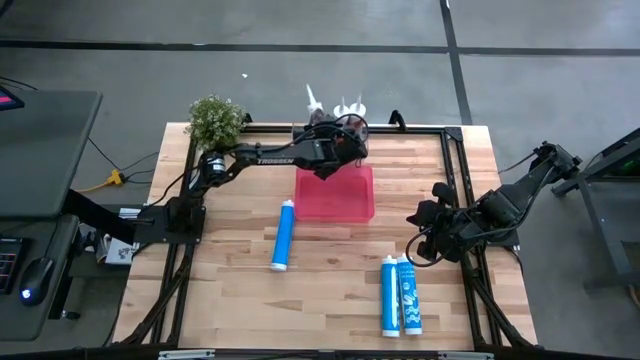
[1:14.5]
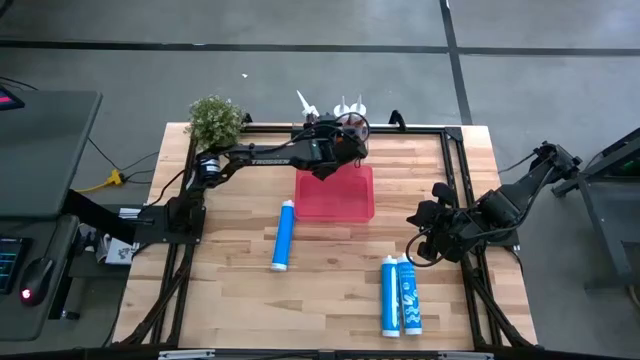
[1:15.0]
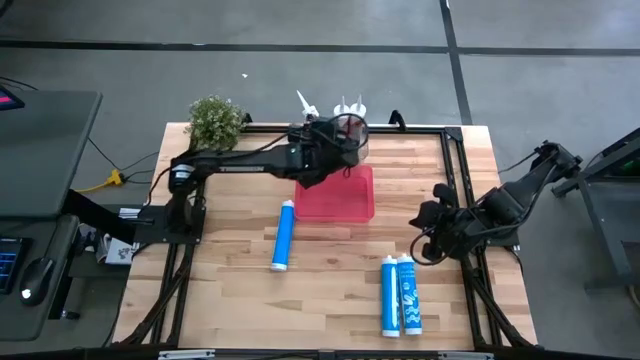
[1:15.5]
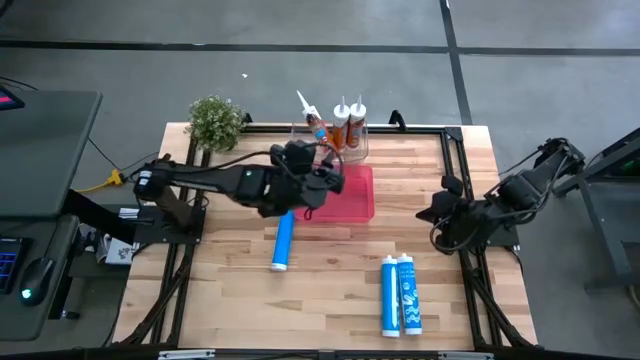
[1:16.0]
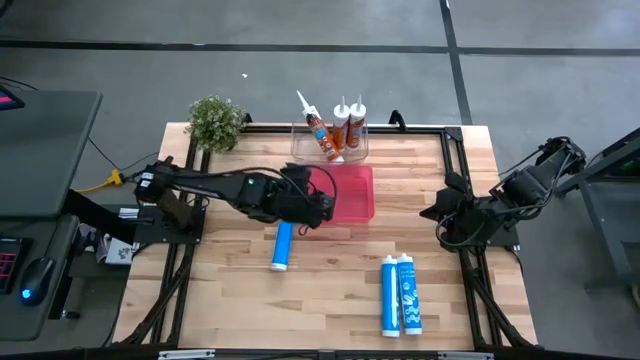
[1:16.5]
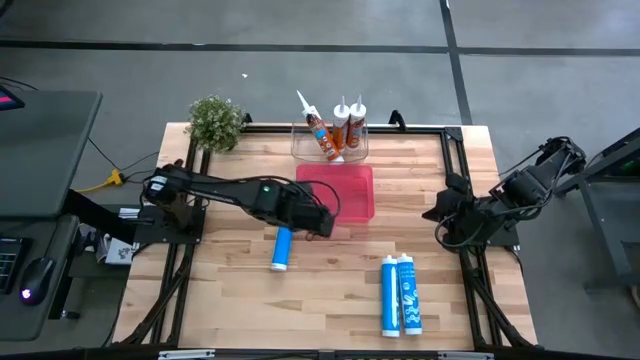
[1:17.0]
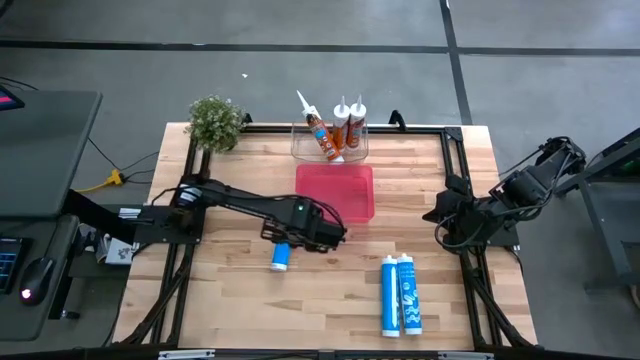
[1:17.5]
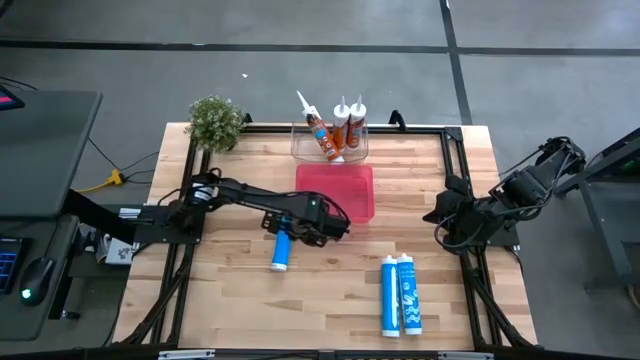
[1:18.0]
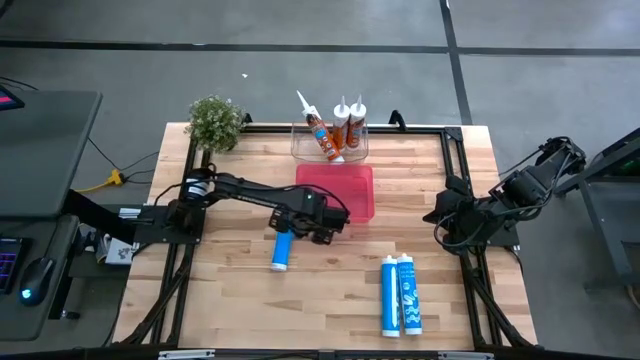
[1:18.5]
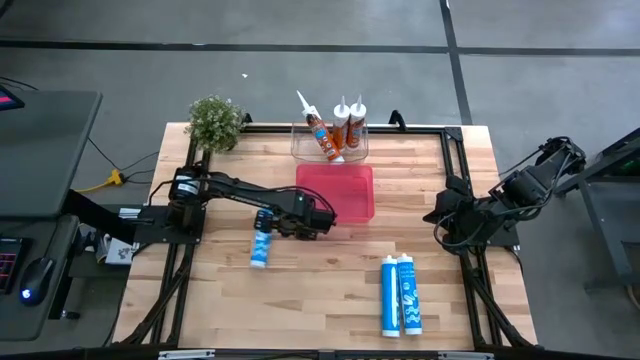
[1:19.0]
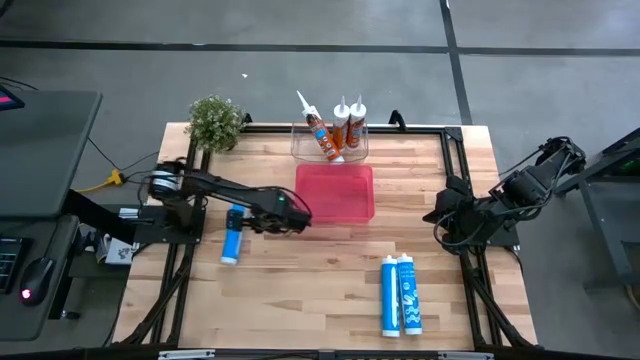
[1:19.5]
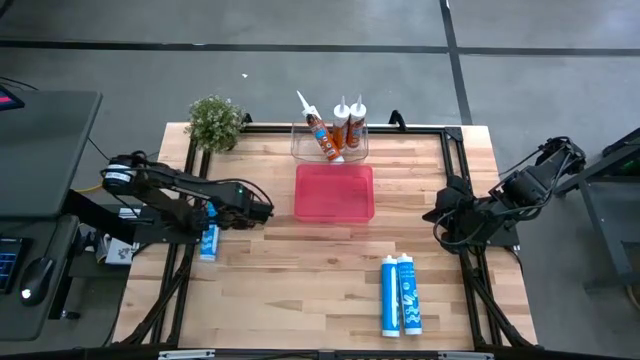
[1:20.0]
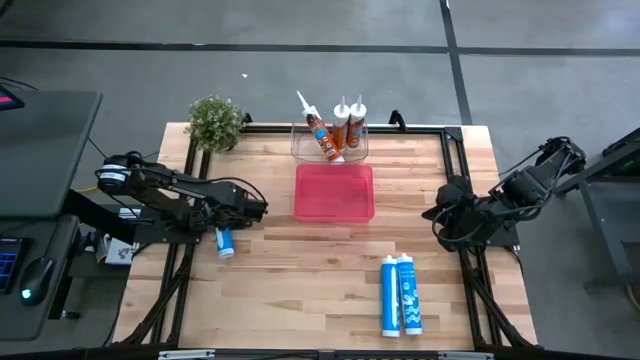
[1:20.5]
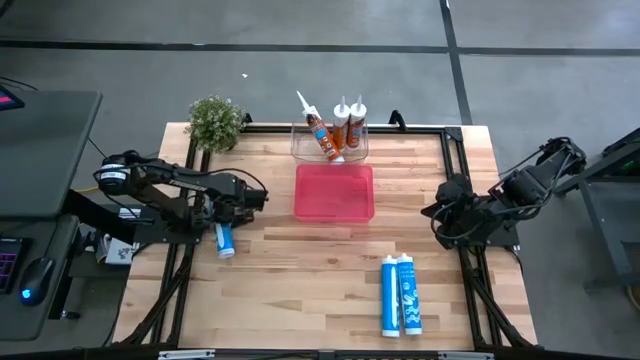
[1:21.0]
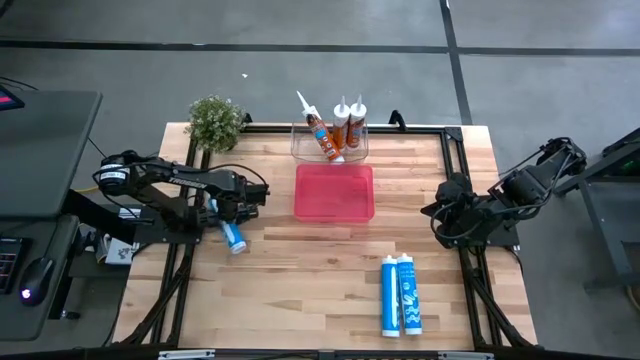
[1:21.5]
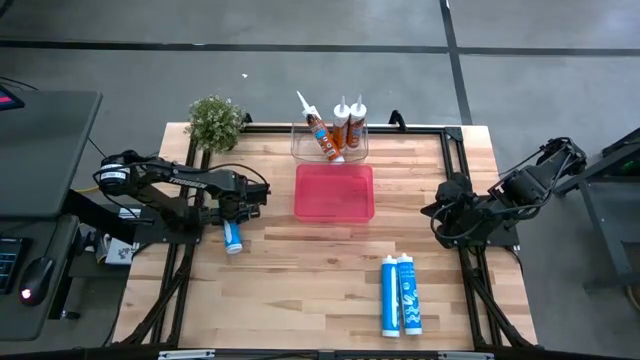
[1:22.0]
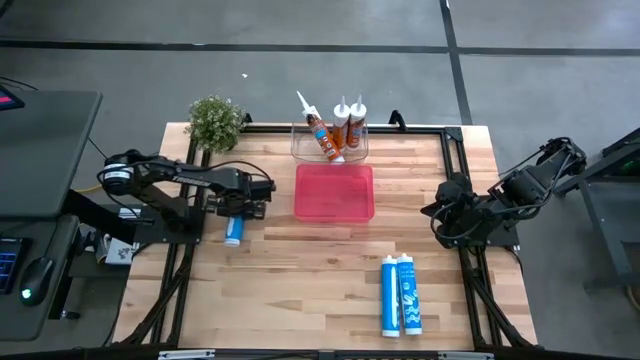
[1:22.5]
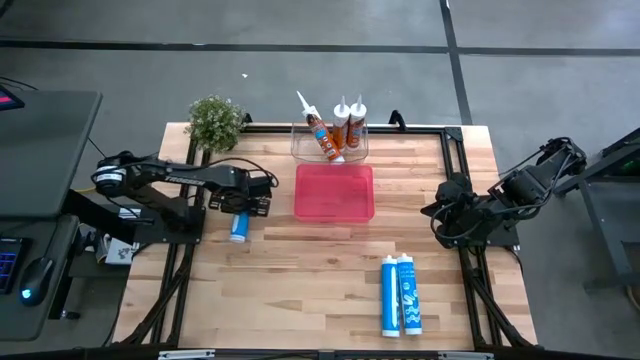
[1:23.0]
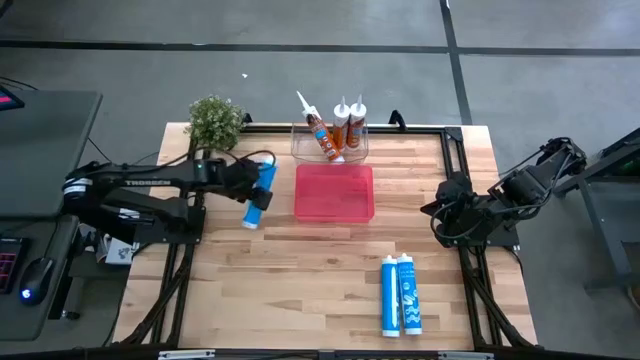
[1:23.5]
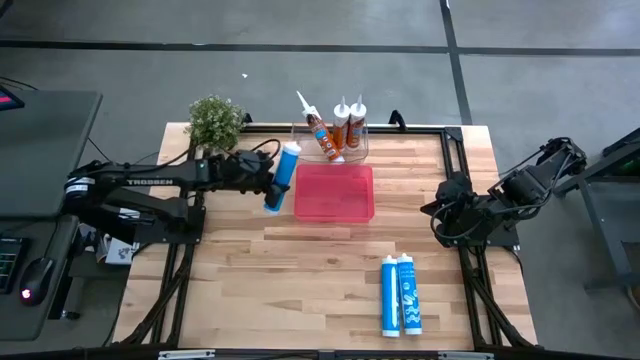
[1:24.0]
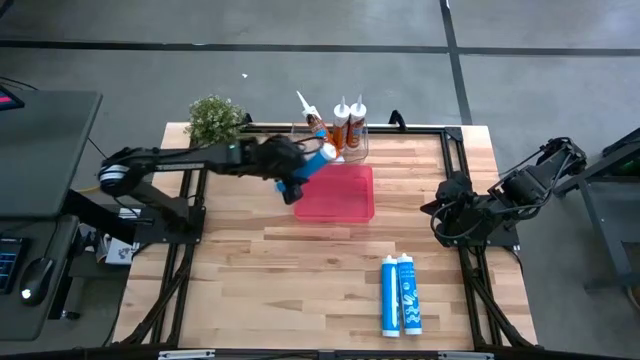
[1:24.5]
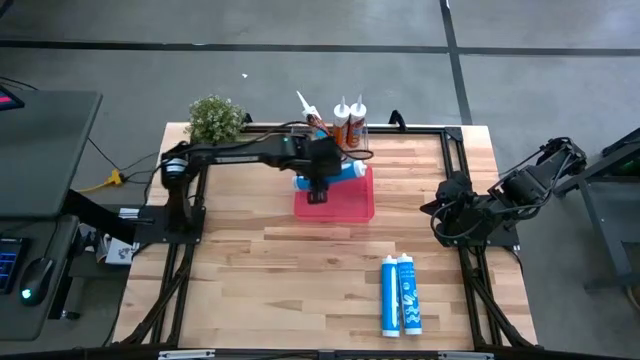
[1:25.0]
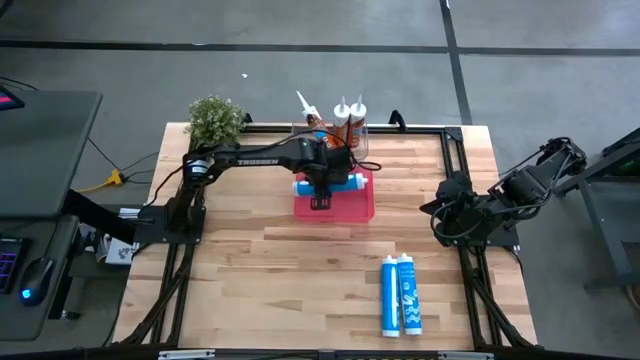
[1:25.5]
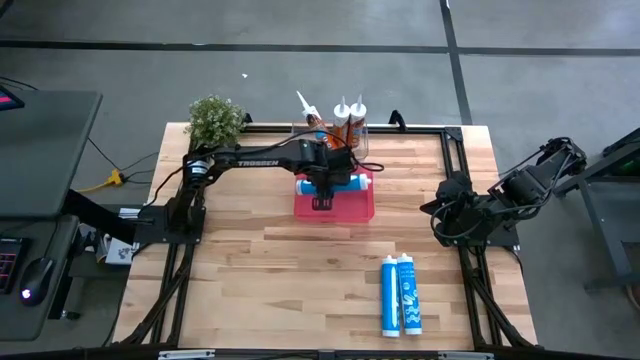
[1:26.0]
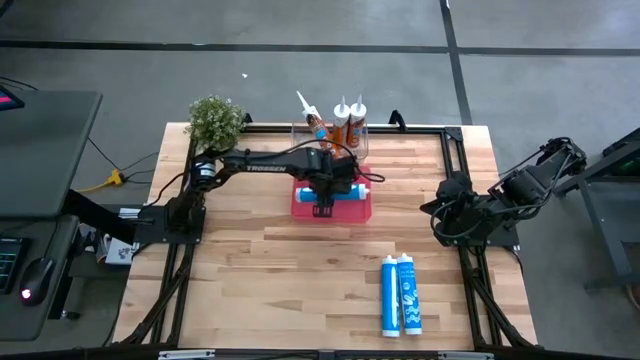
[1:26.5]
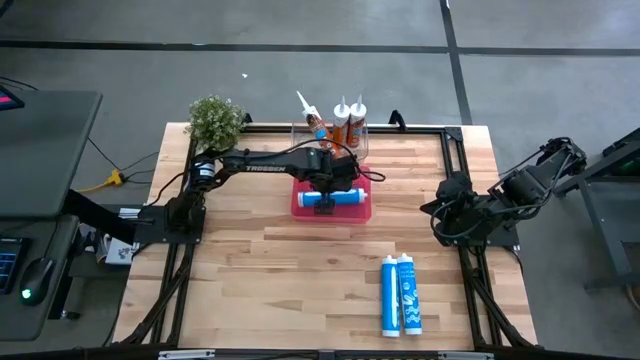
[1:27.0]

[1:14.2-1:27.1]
Task: Pick & place silicon tubes, Sealant and Lysol wipes
Put the left blue sealant into the red container

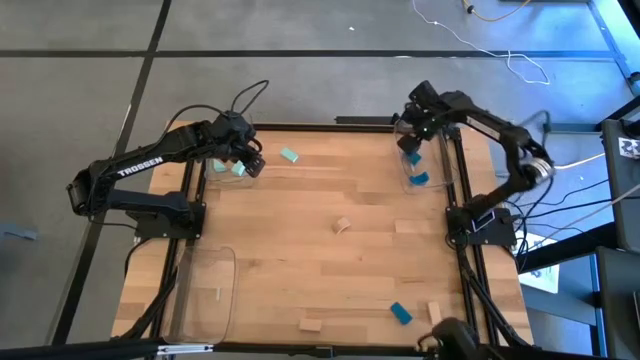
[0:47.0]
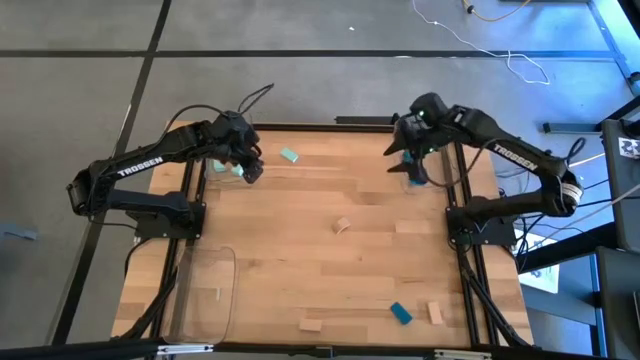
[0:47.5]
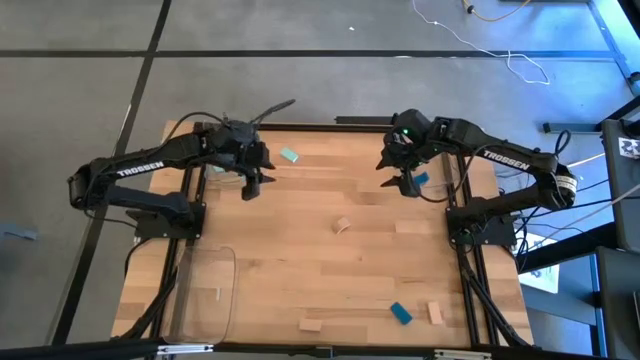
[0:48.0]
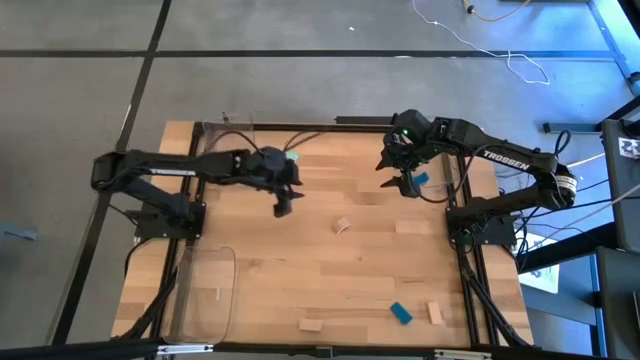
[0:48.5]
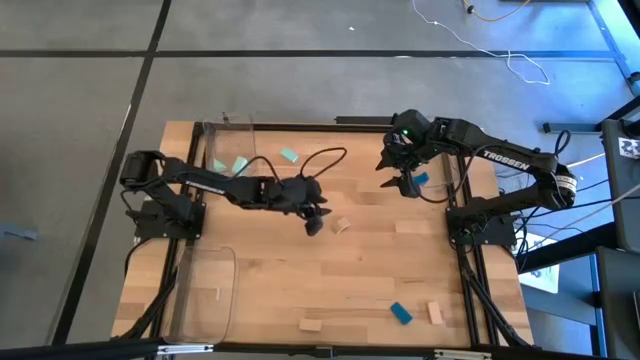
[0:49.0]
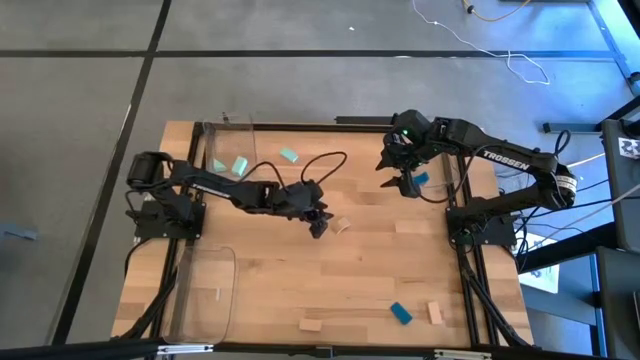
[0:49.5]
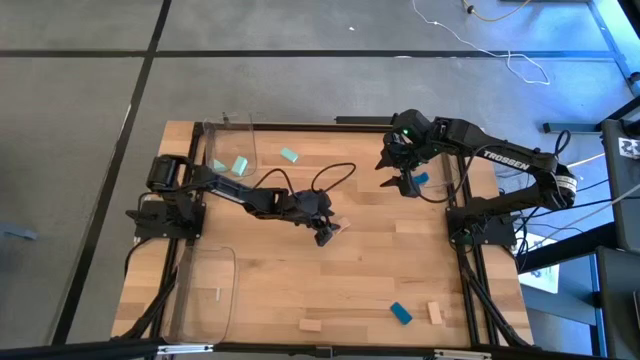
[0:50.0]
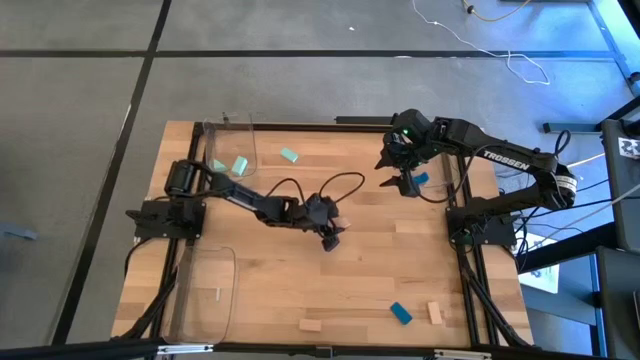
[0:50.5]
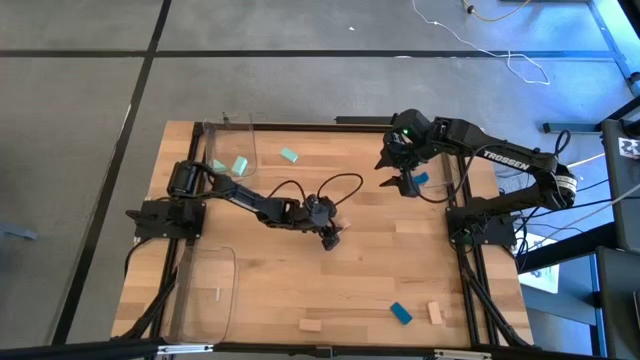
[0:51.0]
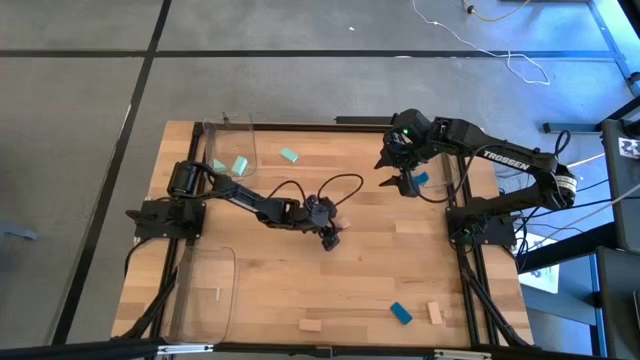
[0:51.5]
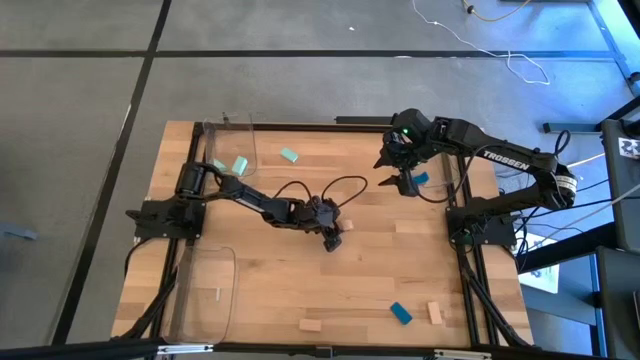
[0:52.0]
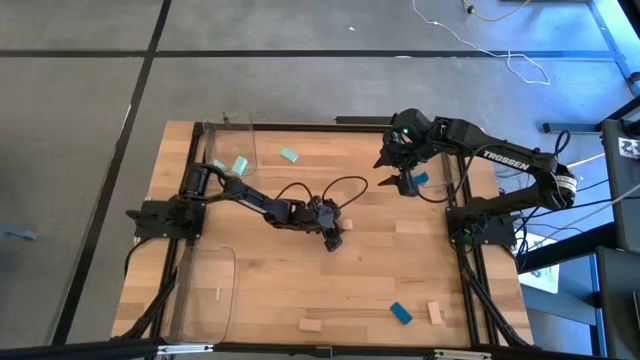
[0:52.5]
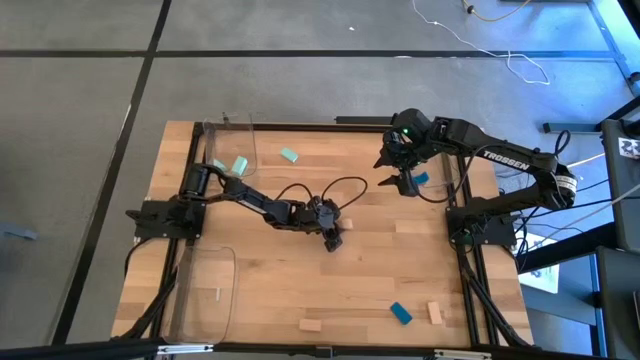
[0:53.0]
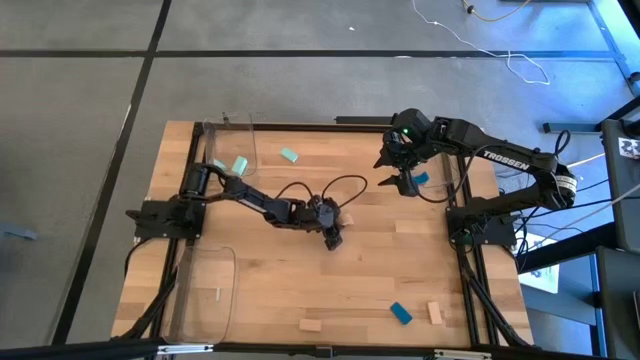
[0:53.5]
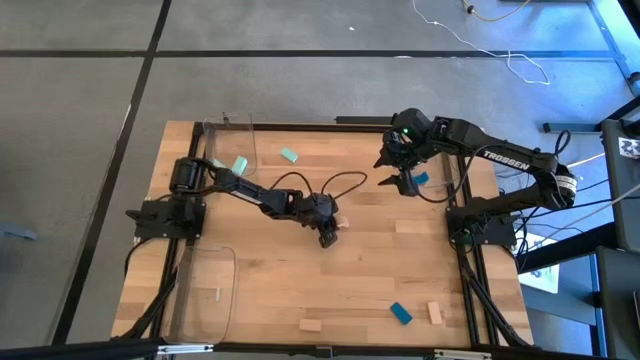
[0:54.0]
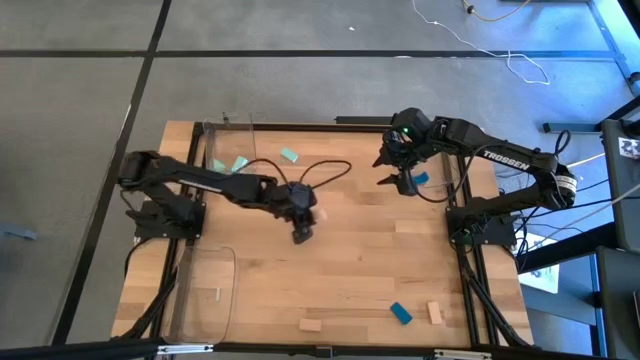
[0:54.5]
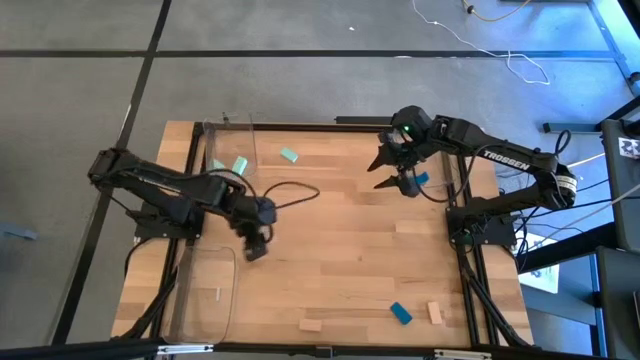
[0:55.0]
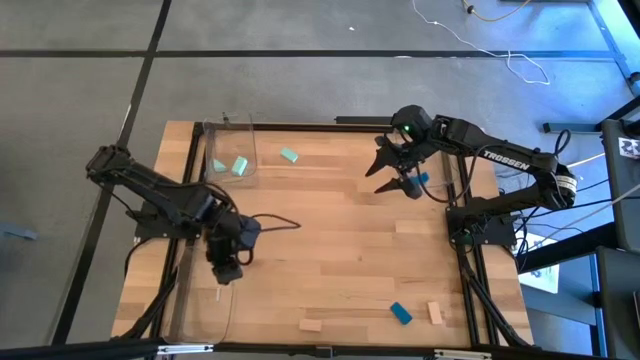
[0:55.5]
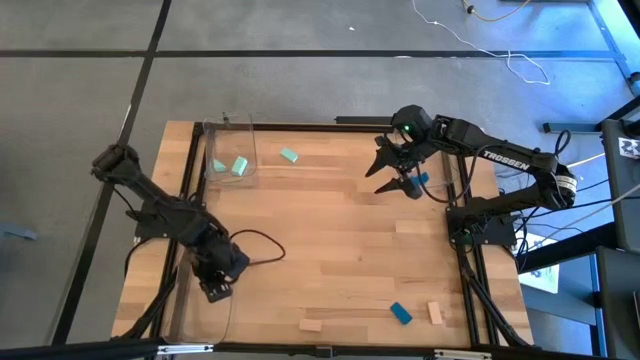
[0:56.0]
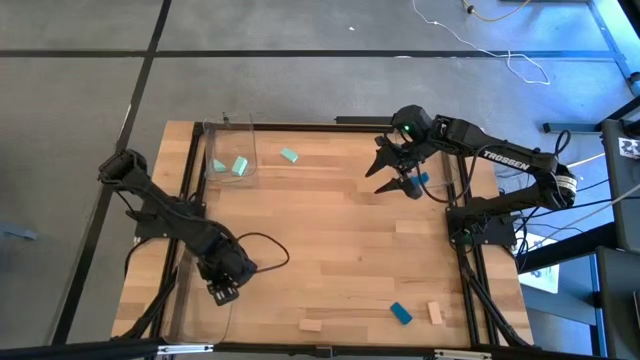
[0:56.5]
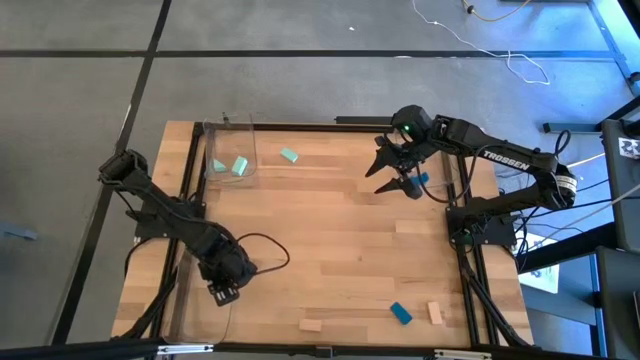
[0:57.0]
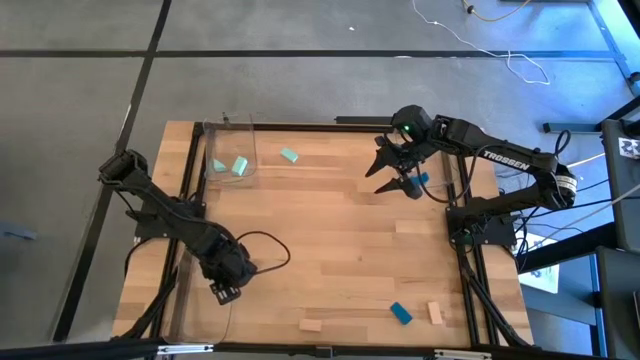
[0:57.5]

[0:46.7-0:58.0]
Task: Sort & place blocks by color
Put the top brown block into the bottom transparent bin
